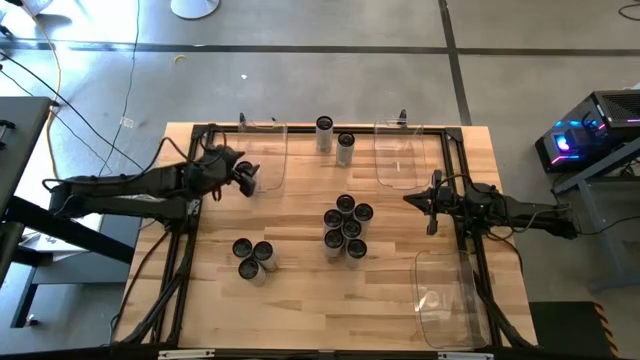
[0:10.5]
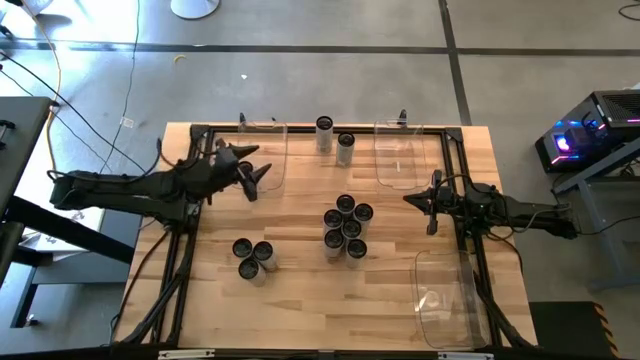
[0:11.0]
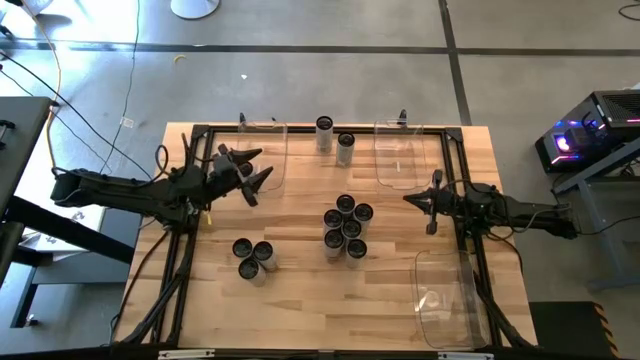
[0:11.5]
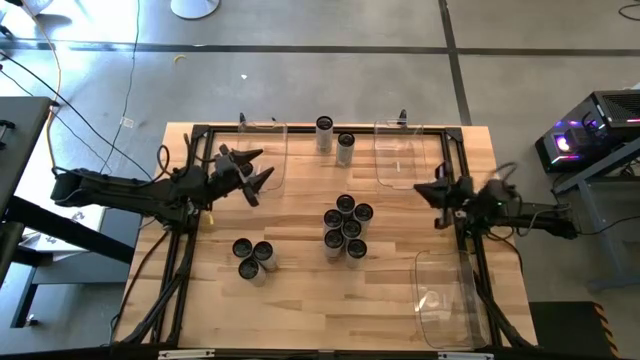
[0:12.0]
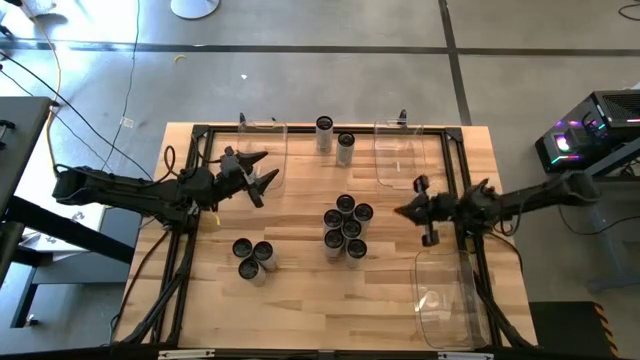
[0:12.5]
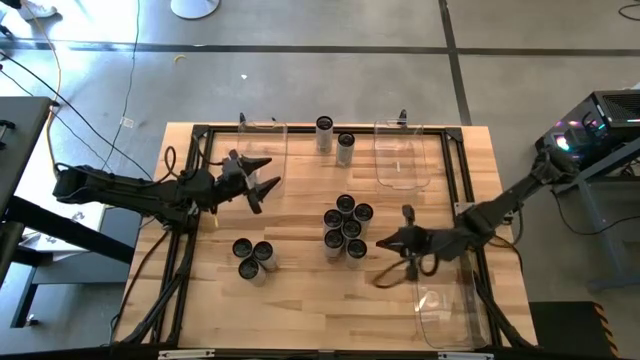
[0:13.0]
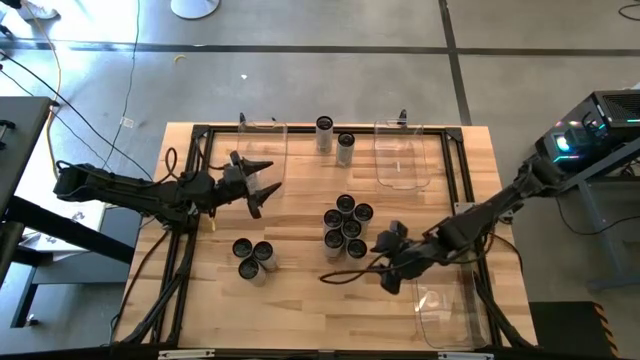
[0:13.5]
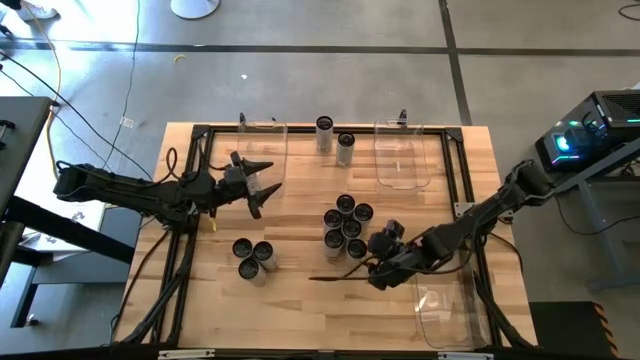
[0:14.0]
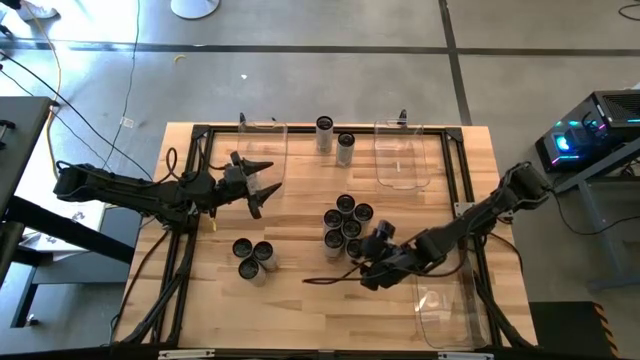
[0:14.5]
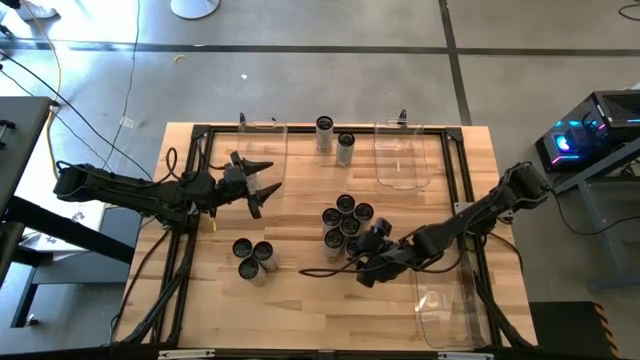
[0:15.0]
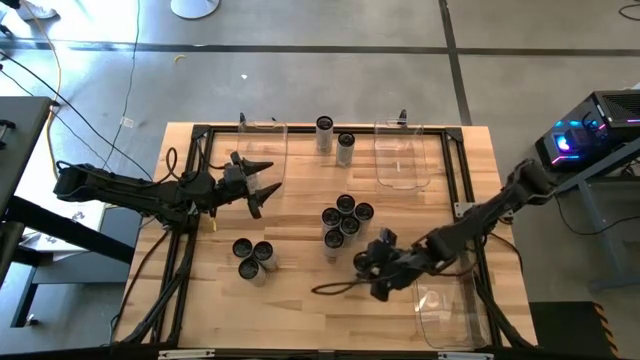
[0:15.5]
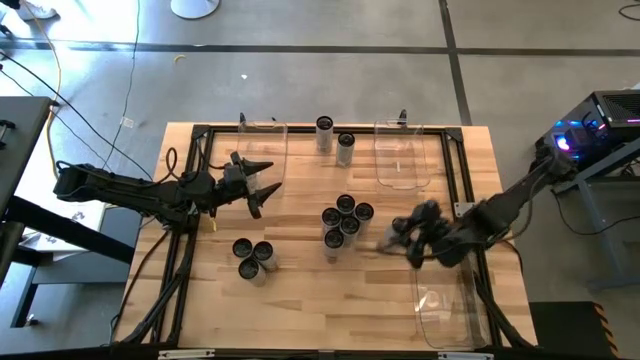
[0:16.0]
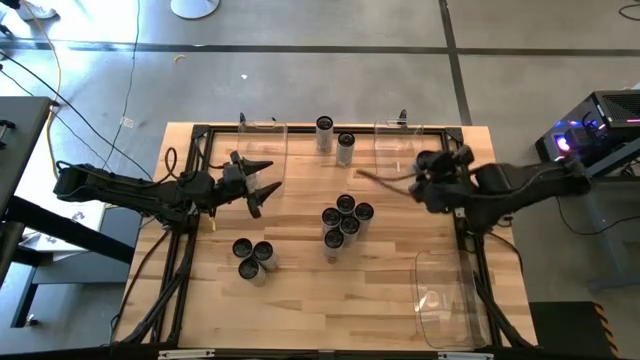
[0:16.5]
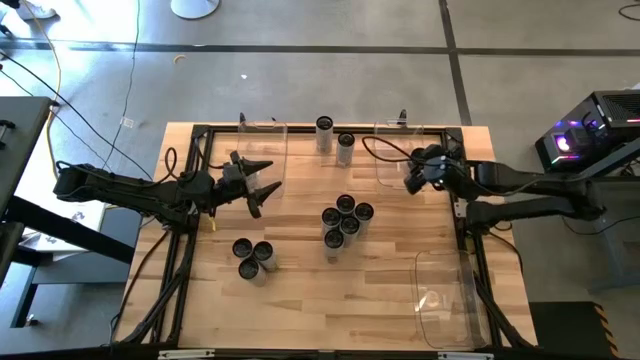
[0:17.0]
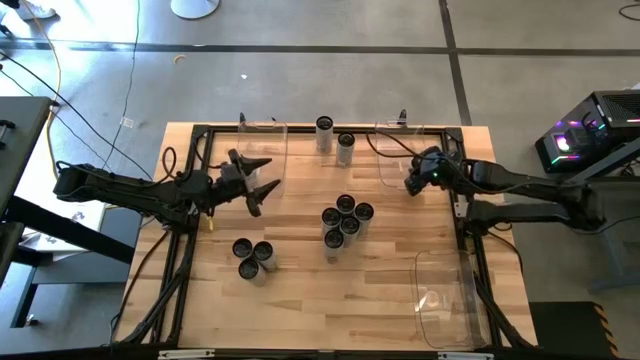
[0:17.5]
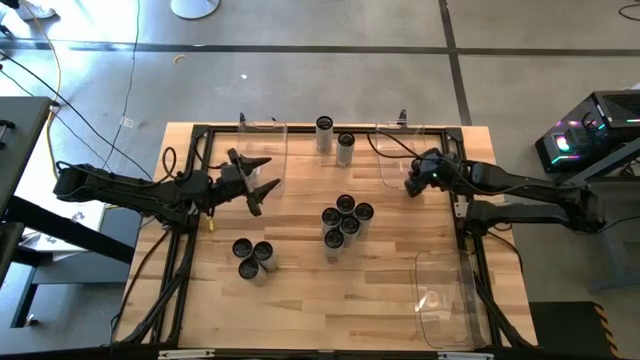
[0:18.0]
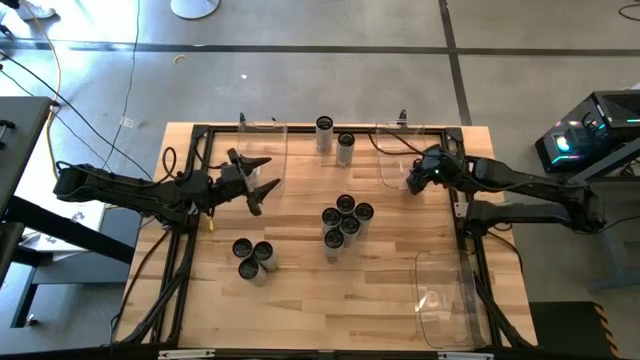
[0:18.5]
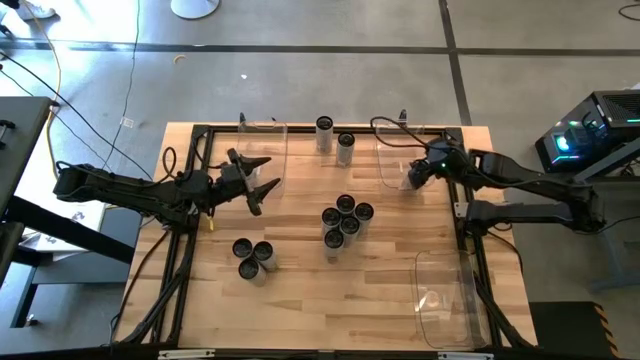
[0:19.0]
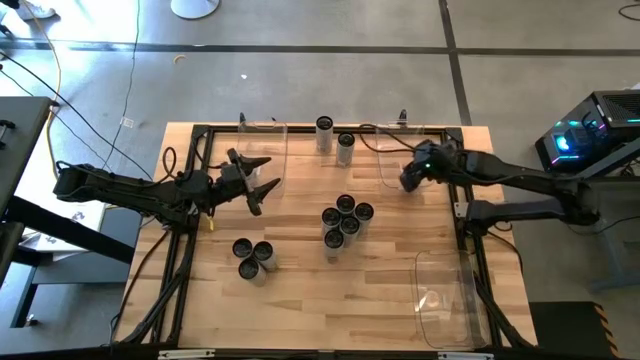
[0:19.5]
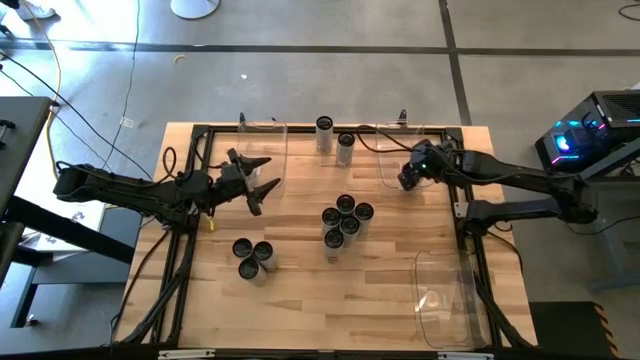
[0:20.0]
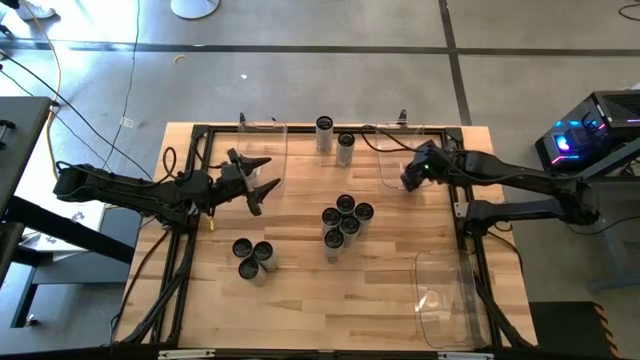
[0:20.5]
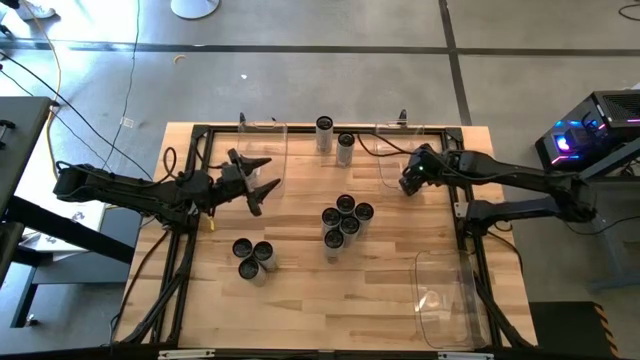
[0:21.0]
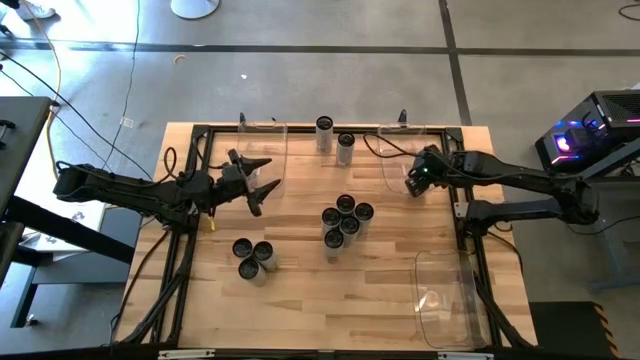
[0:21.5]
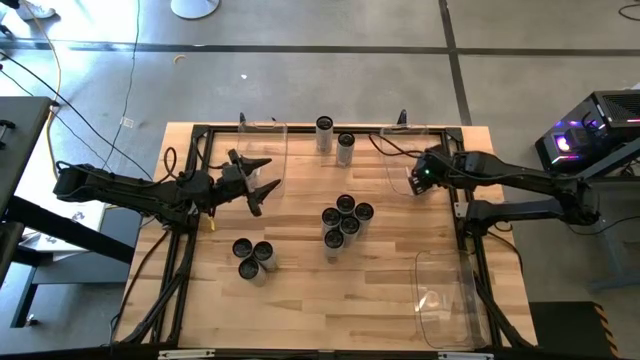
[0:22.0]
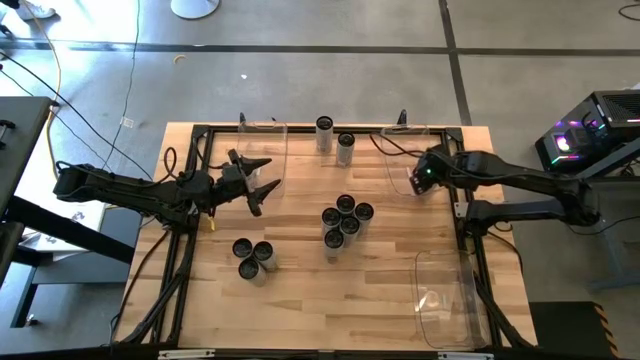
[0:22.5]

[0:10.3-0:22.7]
Task: Sort soda cans
Put the white-yellow soda can into the top right transparent bin

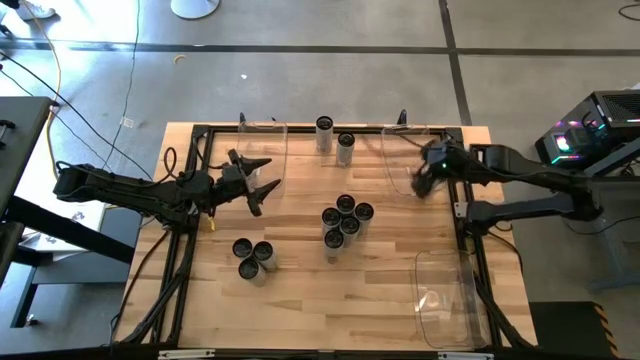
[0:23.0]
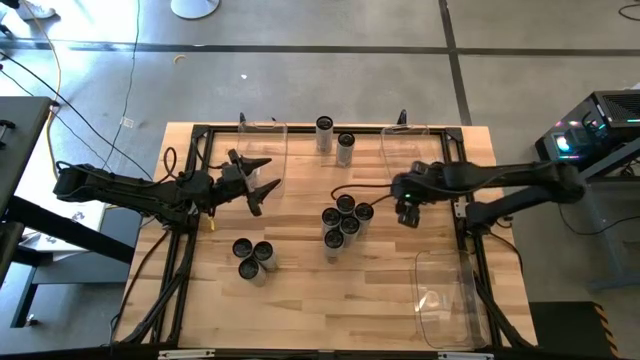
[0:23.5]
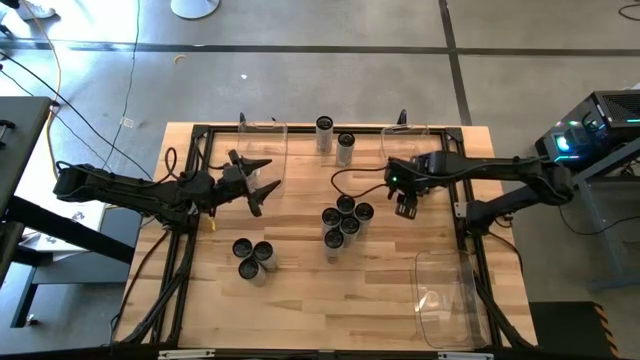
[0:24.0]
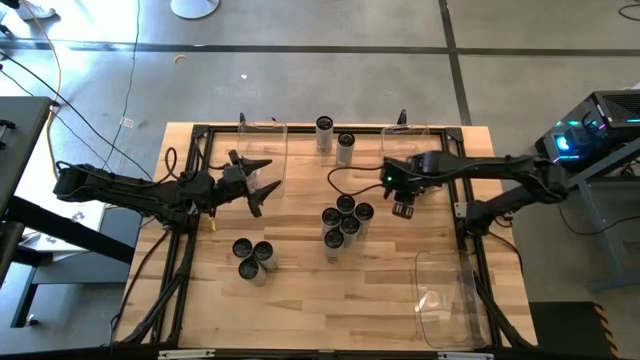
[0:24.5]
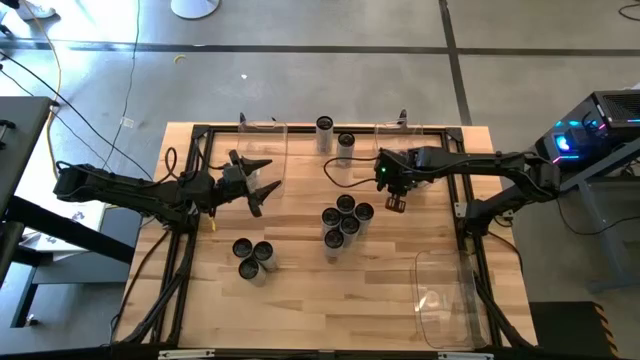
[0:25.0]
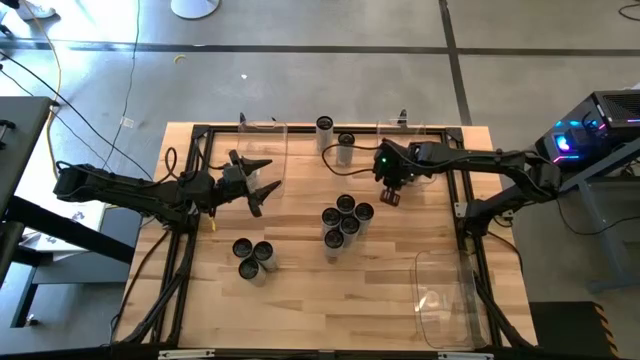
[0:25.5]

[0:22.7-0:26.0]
Adjust the top right transparent bin on the table

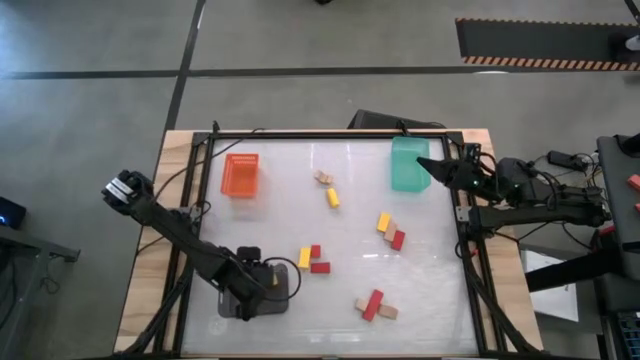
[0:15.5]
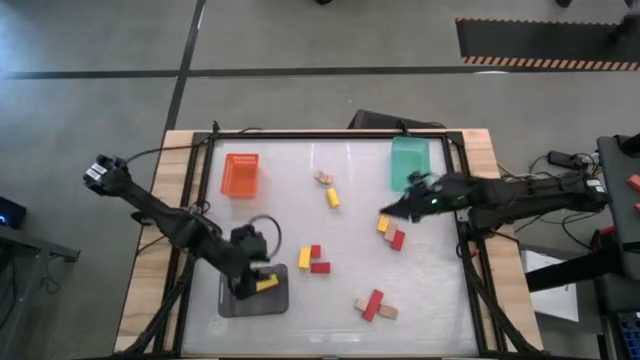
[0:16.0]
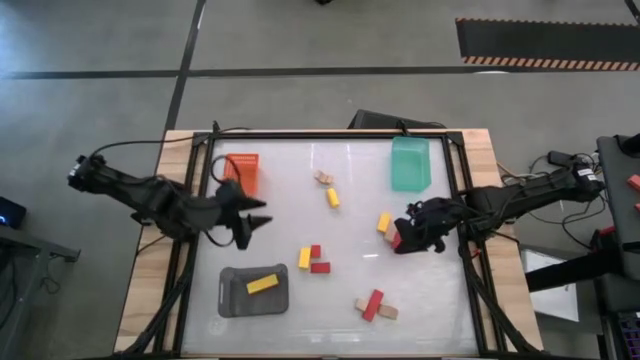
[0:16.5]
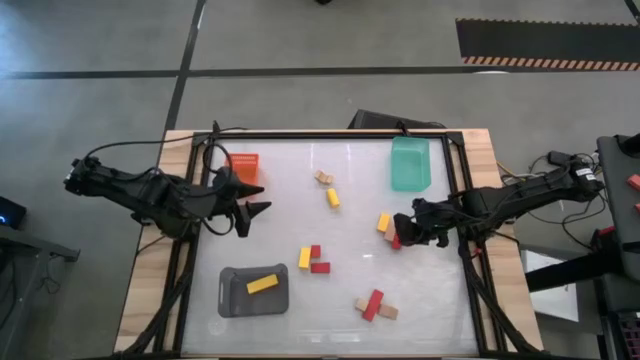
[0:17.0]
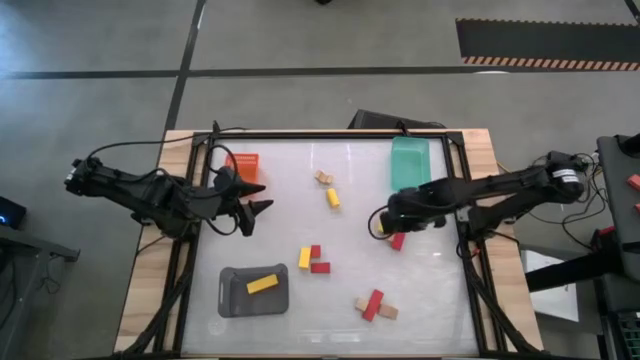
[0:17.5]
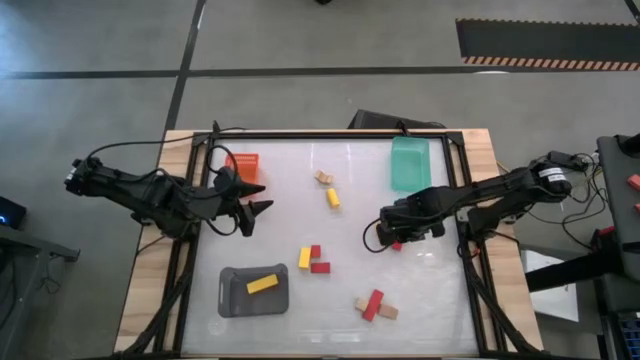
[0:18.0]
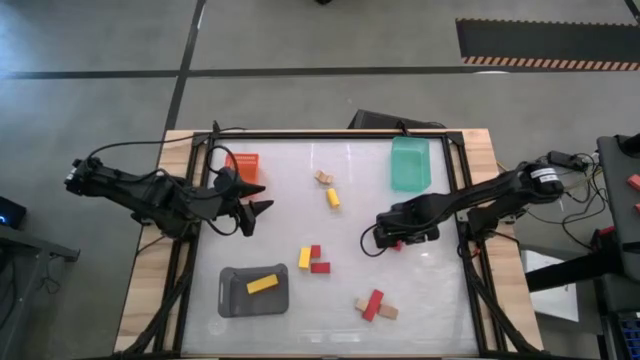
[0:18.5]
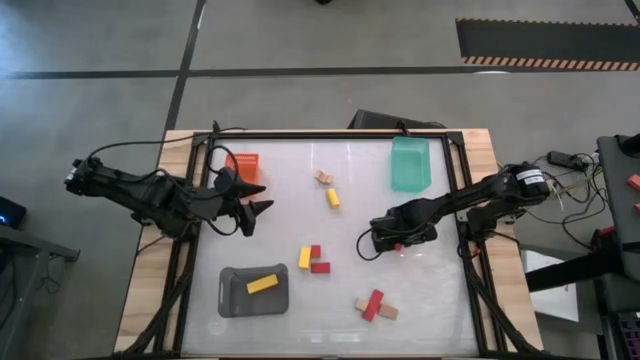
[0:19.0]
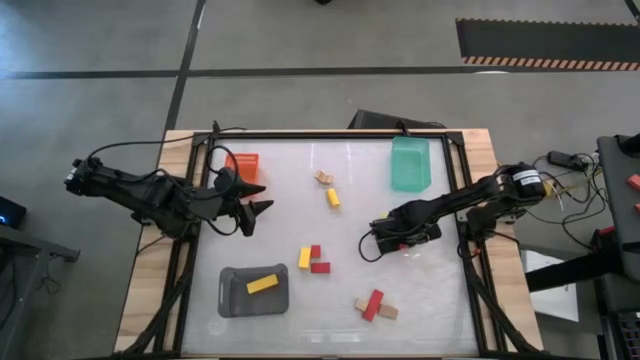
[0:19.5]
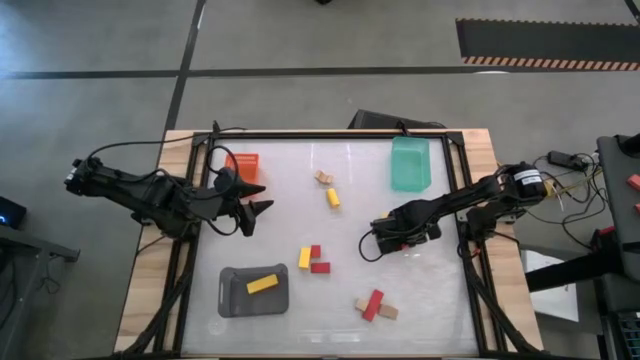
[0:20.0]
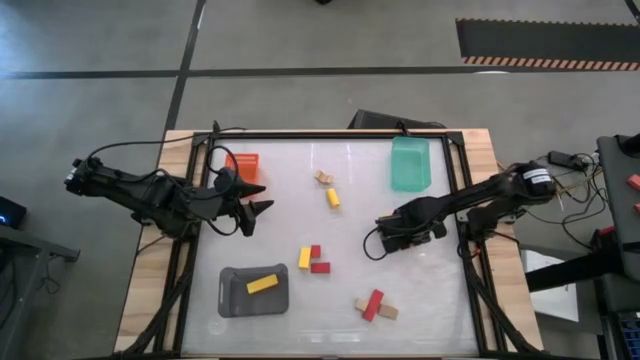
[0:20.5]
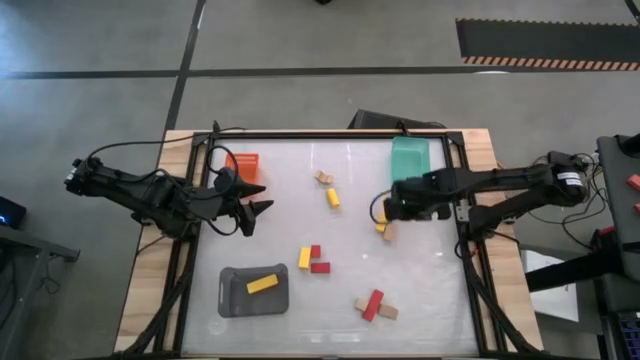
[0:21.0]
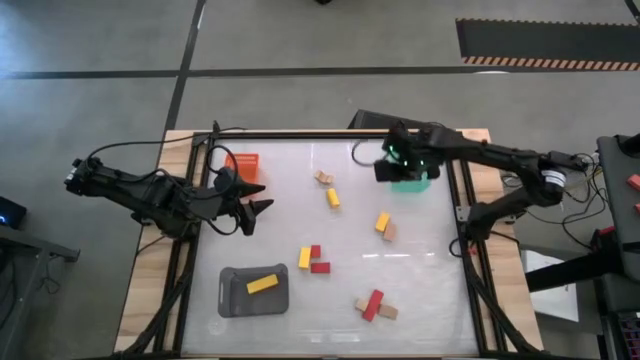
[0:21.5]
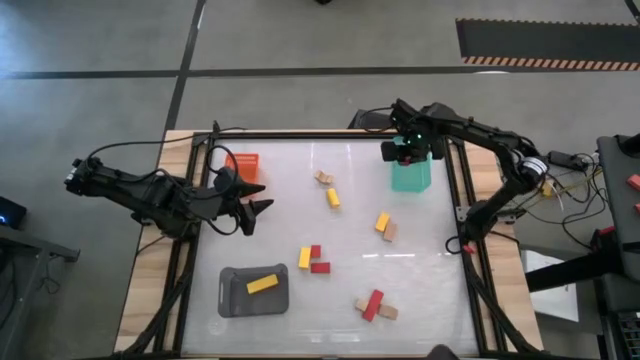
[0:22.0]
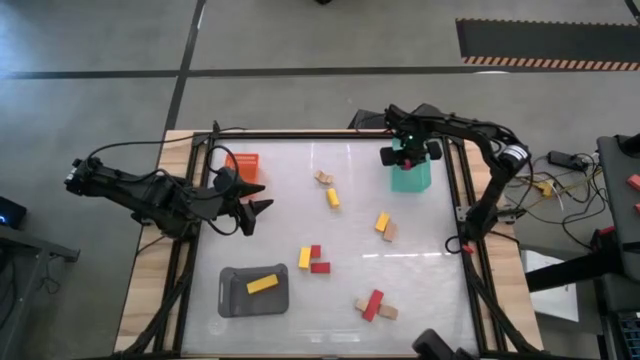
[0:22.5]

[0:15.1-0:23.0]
Task: Sort & place blocks by color
Put the red block into the green bin
